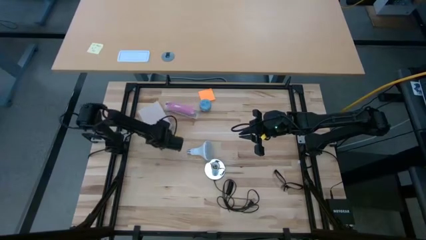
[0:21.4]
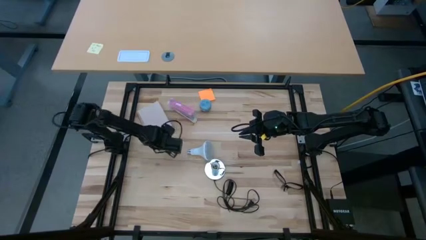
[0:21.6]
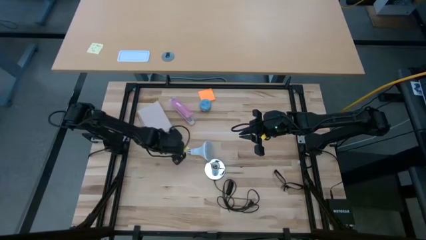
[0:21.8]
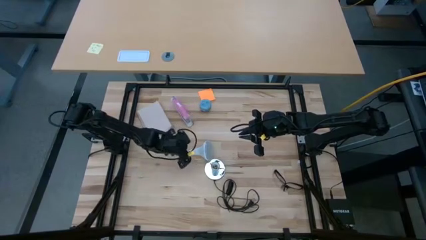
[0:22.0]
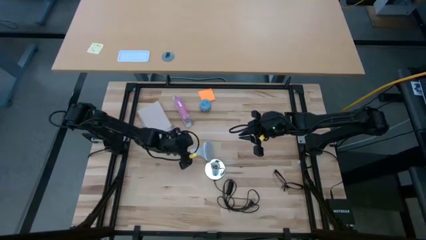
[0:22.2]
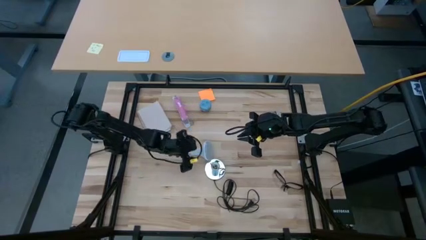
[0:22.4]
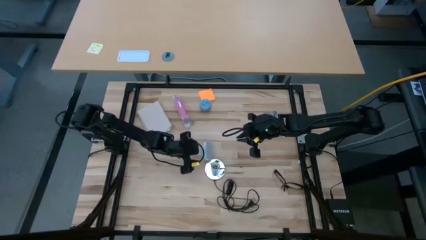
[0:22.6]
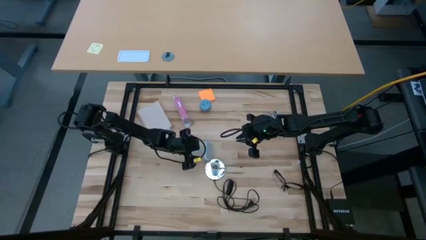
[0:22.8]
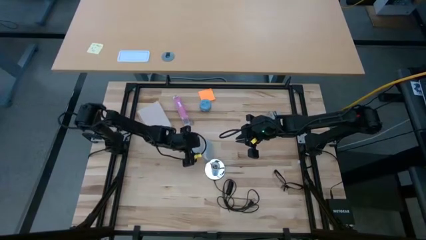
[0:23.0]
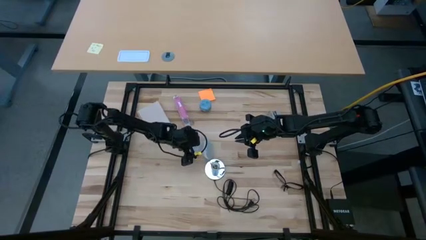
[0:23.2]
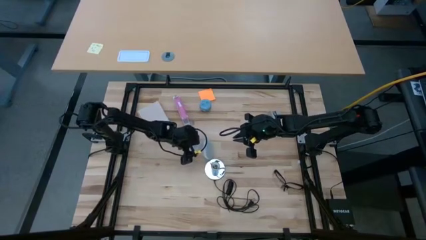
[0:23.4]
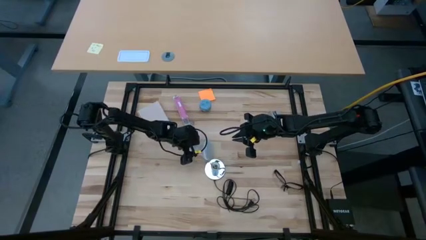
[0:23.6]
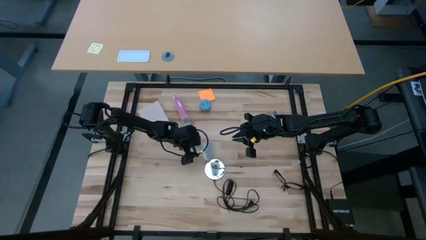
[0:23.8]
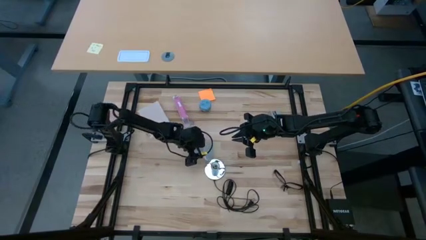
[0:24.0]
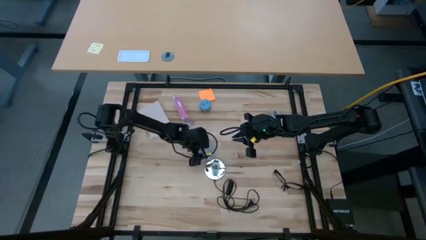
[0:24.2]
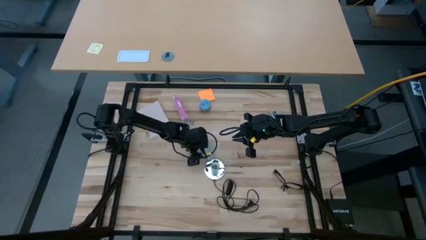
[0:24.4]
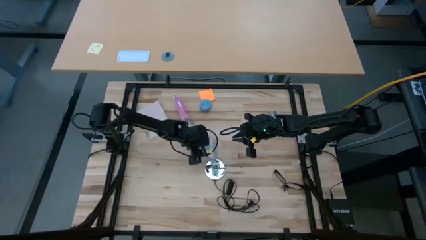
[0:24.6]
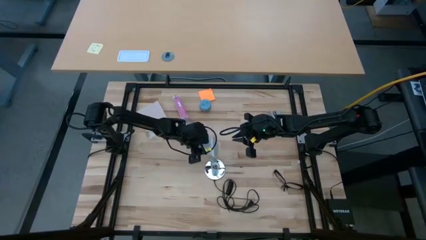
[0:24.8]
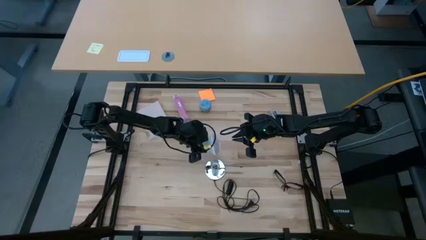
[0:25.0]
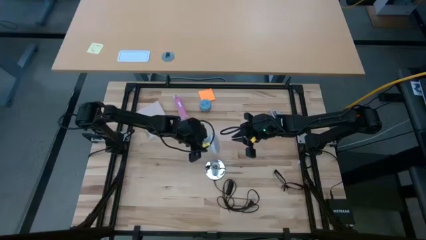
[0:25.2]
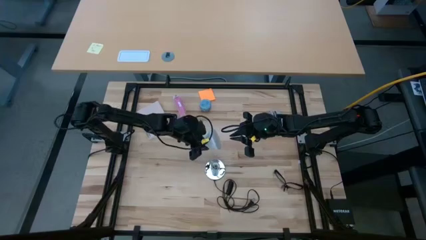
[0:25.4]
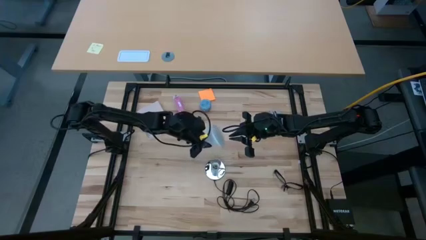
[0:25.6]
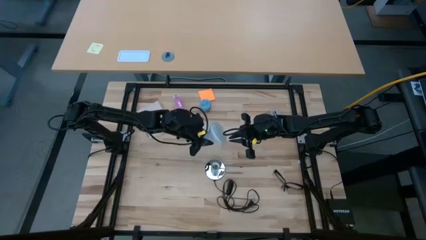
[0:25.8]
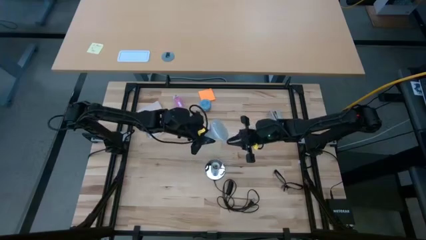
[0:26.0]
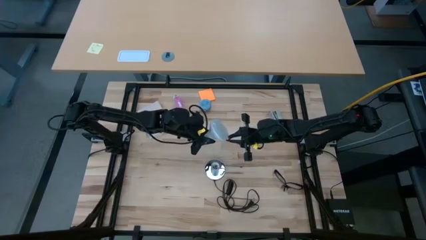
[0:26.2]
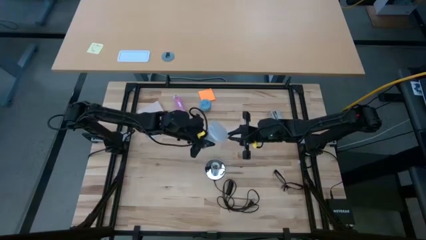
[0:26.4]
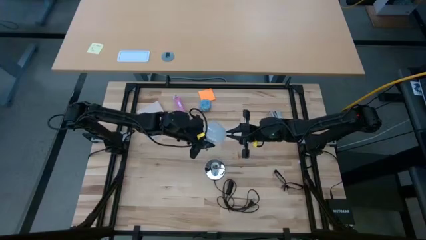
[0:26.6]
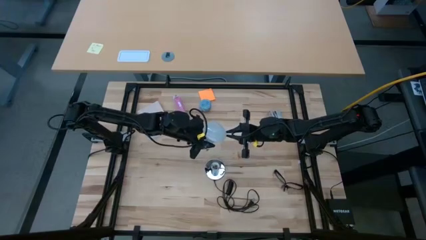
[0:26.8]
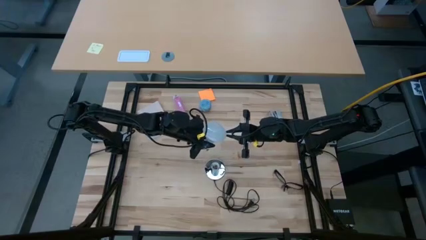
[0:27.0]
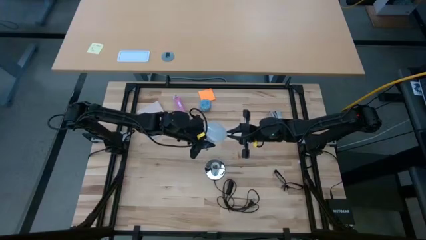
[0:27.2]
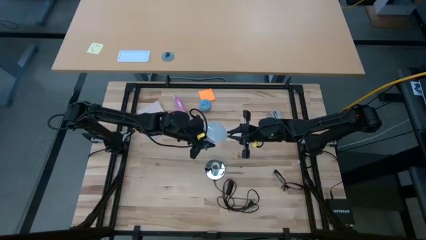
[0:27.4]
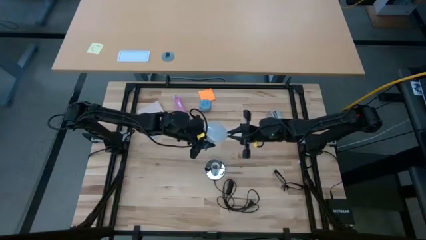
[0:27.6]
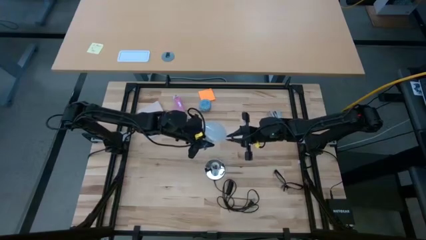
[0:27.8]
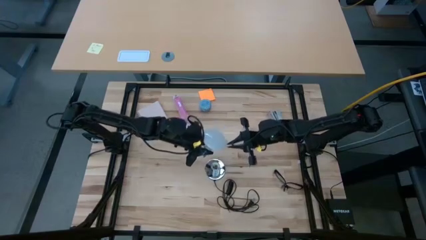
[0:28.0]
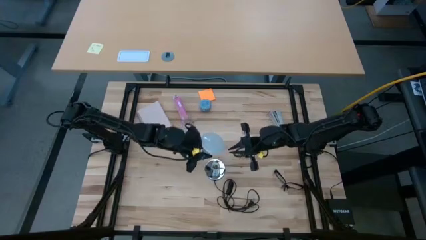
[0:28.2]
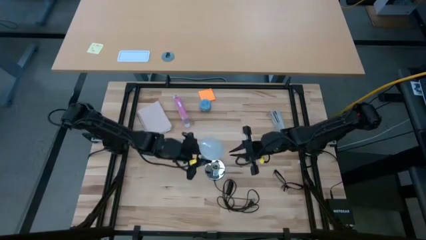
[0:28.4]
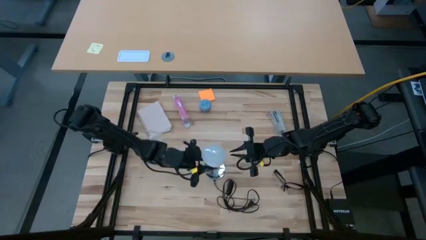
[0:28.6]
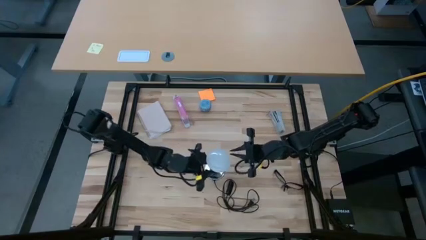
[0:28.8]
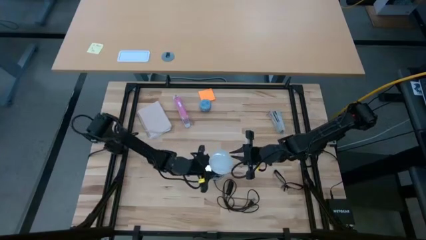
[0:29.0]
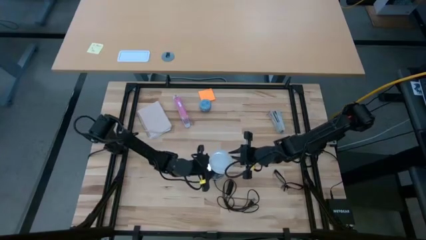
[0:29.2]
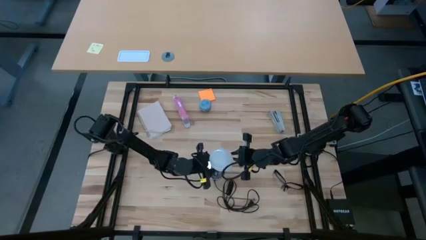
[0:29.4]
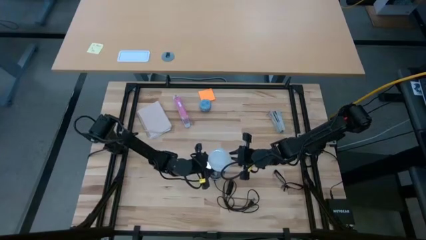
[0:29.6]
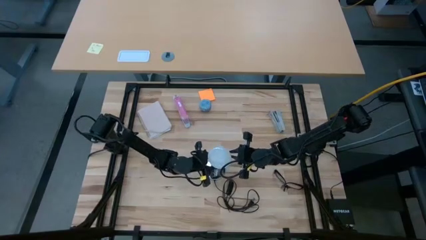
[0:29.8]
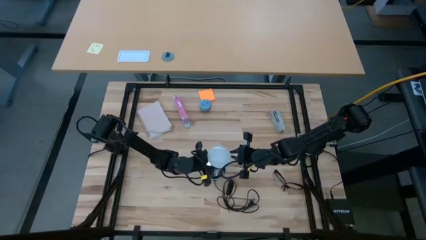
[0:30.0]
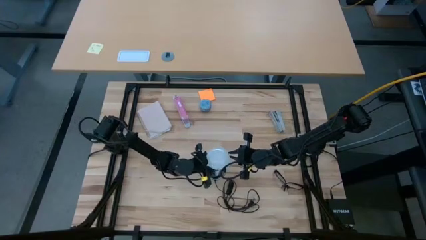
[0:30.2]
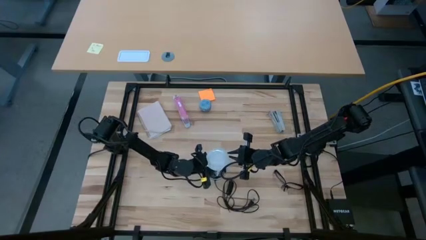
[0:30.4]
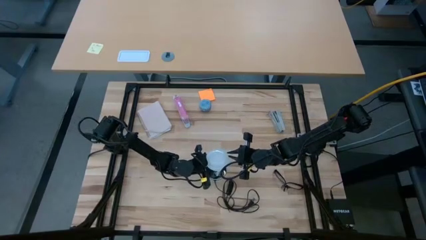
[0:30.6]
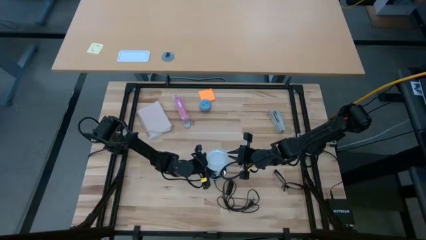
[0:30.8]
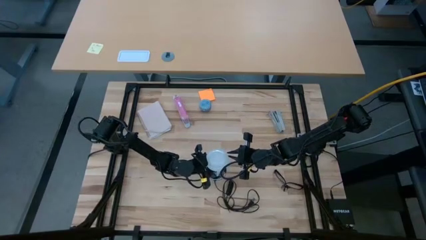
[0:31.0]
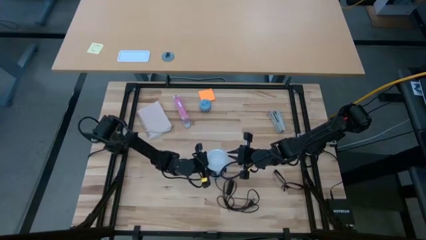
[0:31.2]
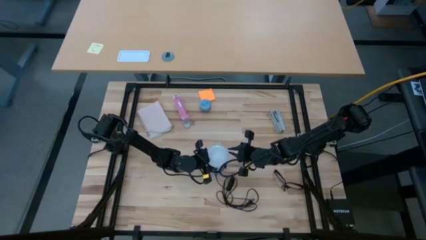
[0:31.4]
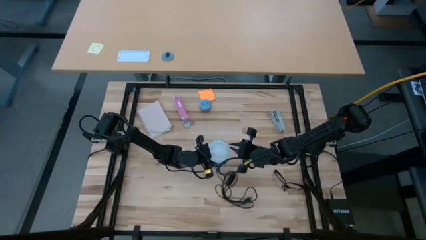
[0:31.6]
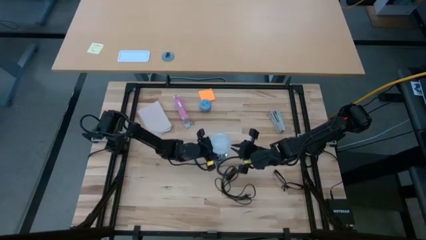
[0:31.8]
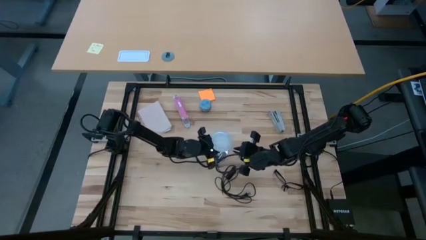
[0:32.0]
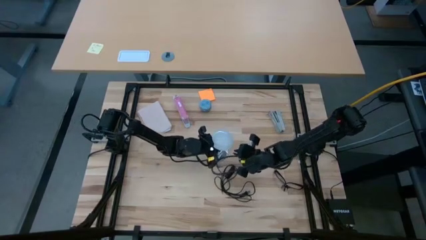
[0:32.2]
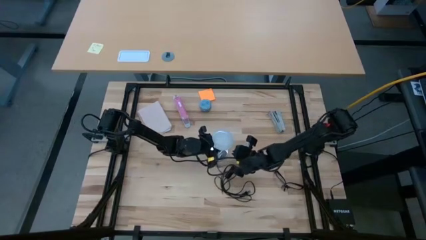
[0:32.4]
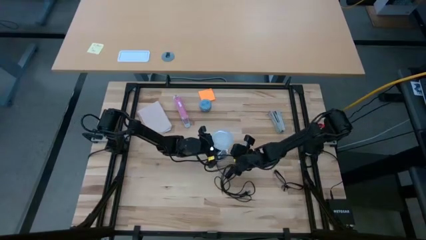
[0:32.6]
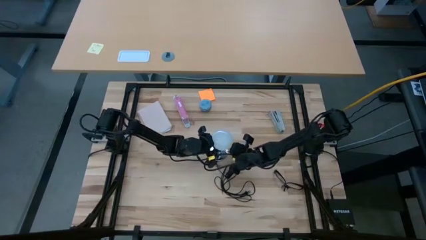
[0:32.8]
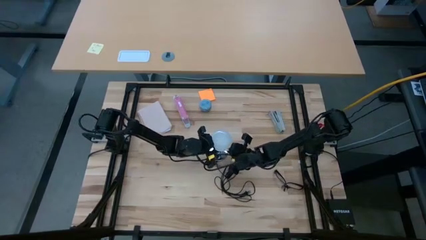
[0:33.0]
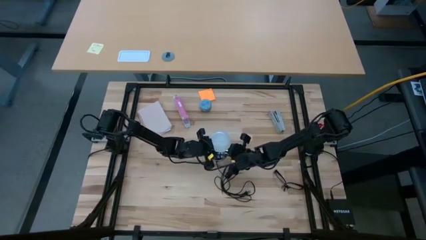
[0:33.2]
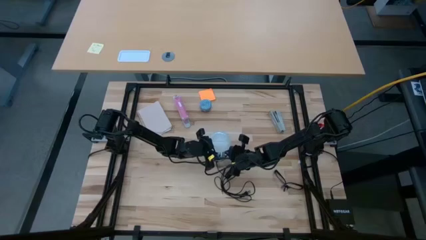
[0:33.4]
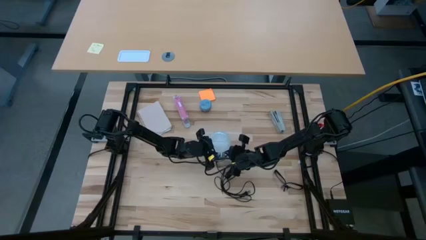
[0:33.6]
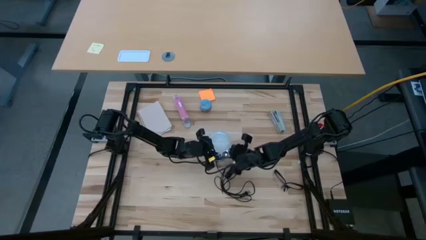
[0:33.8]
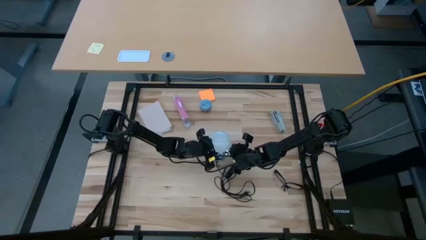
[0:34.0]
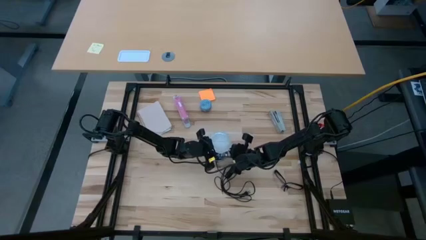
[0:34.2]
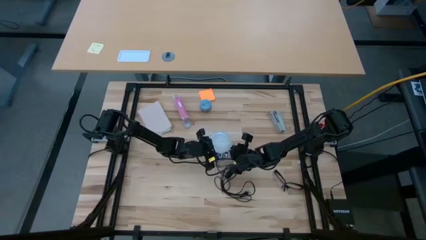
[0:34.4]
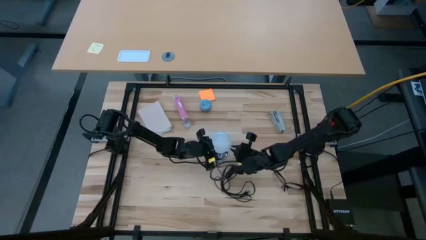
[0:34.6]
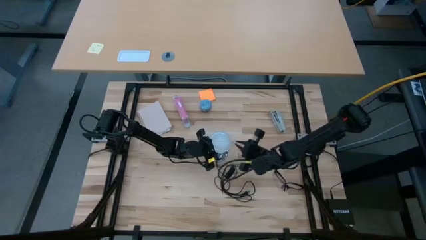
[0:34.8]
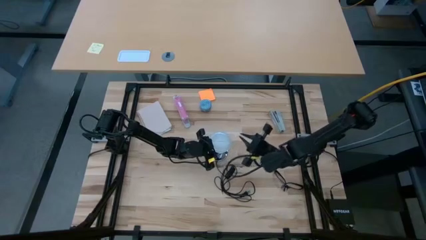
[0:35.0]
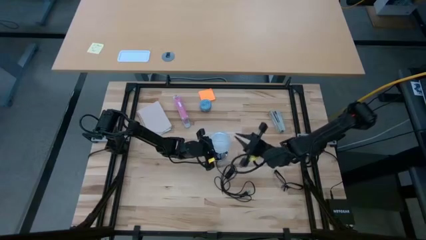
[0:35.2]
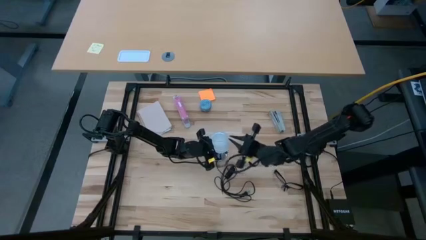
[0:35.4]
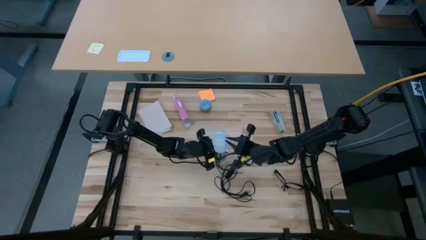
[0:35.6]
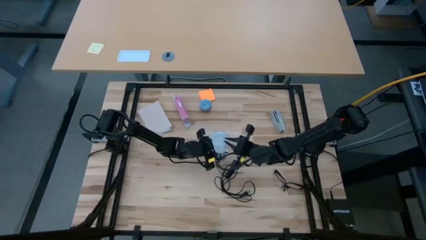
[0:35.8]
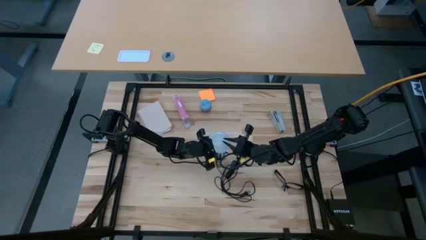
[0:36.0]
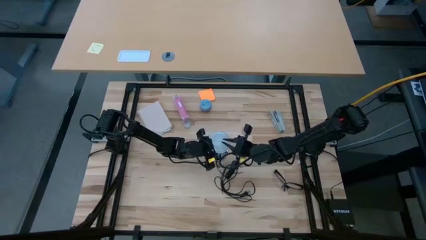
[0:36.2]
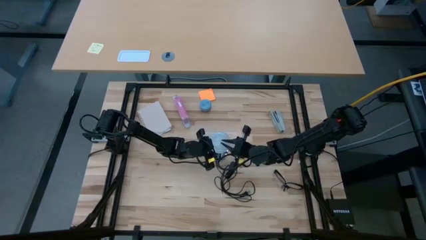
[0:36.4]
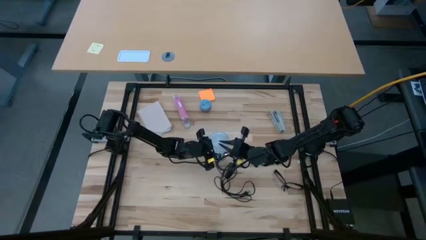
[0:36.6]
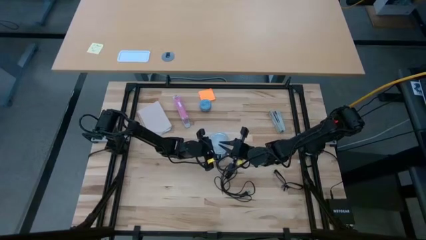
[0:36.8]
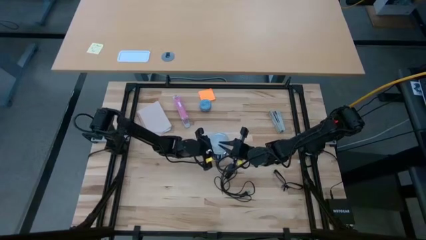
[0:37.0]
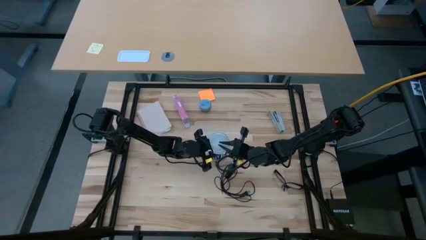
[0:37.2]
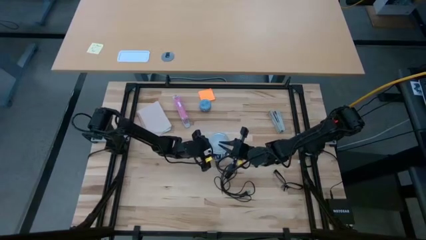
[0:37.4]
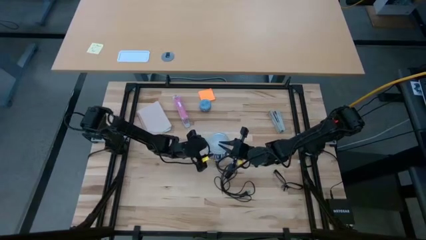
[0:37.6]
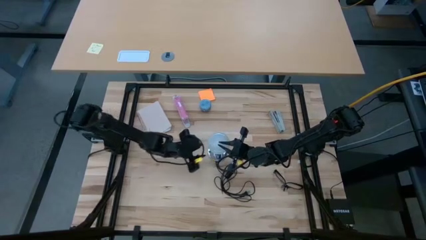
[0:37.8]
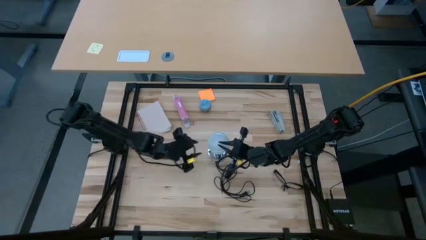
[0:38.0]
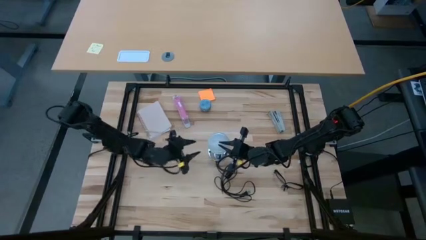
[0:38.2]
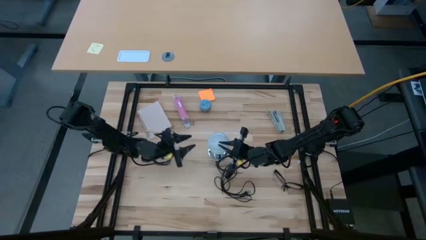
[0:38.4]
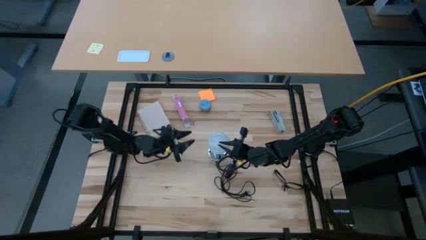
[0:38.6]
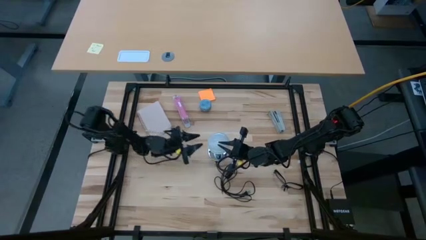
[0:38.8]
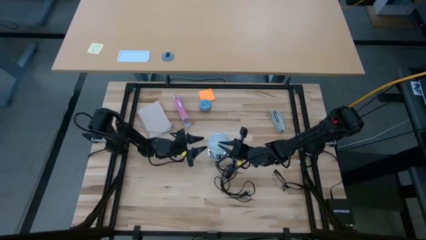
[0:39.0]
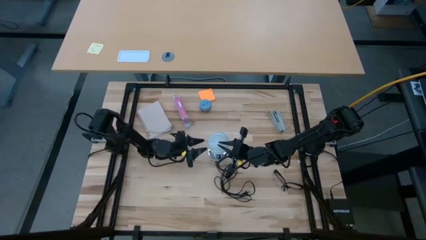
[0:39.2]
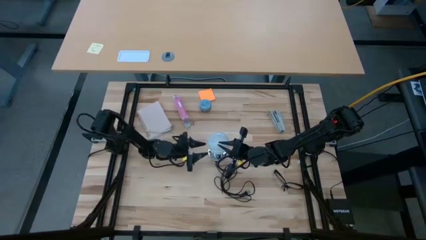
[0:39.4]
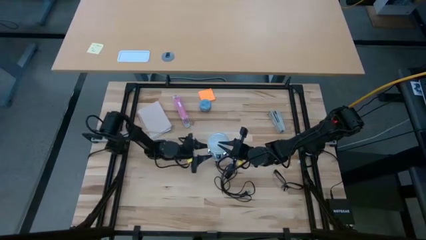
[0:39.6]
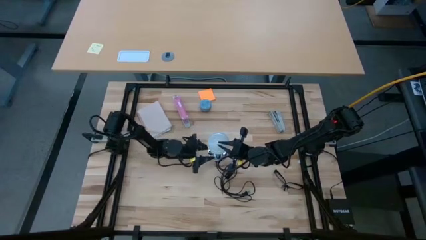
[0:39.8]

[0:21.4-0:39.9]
Task: Screw lightbulb
Insert the lightbulb into the lamp
